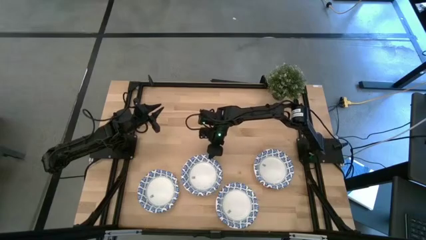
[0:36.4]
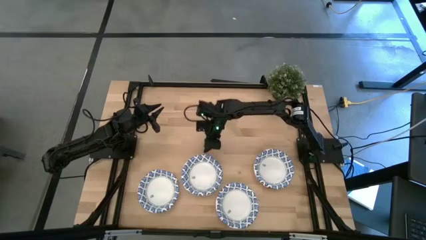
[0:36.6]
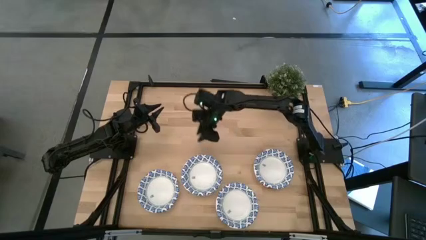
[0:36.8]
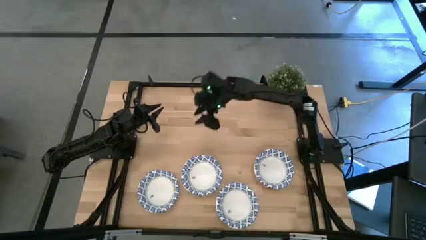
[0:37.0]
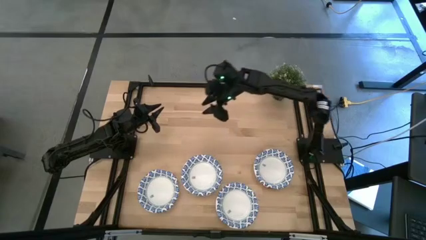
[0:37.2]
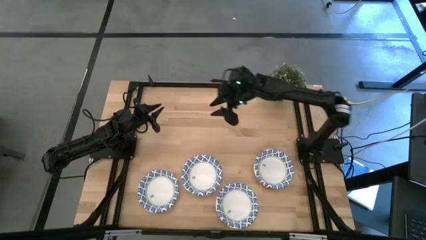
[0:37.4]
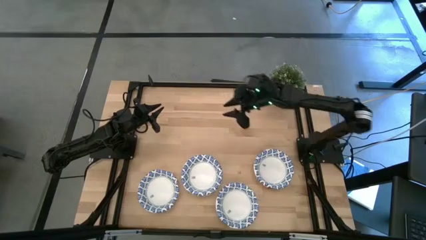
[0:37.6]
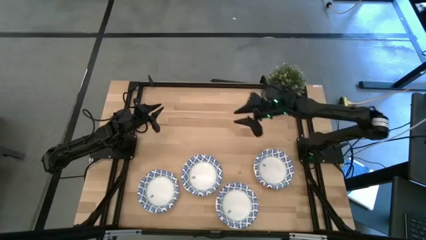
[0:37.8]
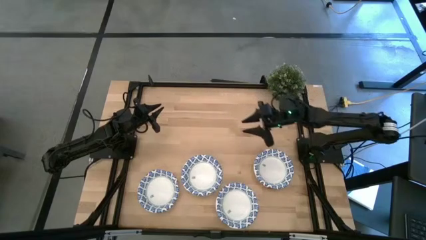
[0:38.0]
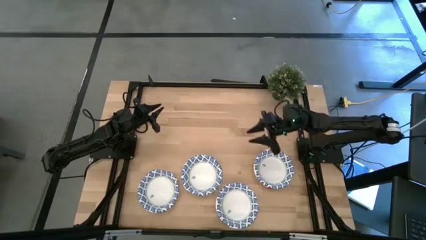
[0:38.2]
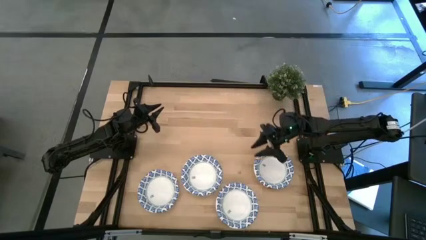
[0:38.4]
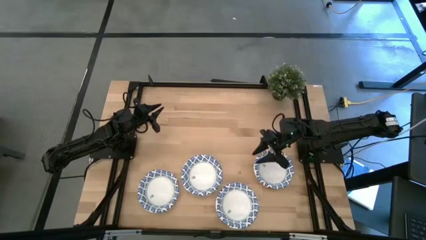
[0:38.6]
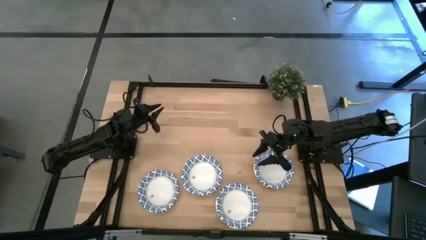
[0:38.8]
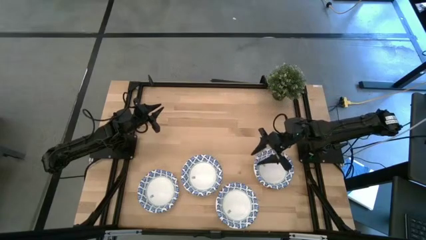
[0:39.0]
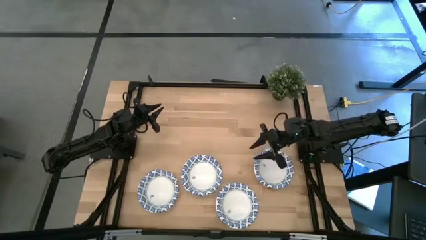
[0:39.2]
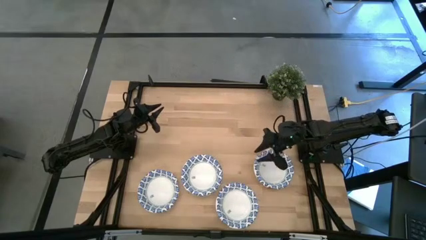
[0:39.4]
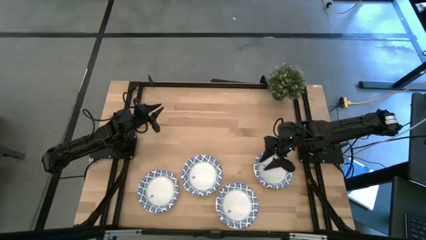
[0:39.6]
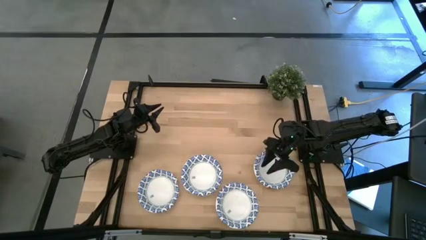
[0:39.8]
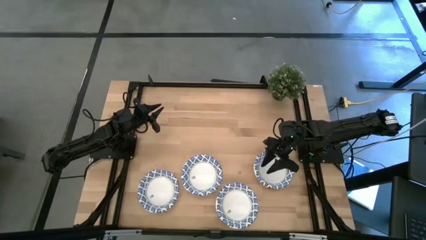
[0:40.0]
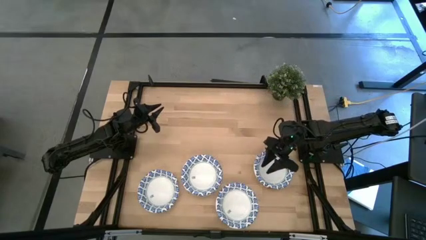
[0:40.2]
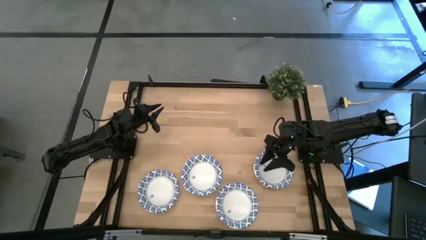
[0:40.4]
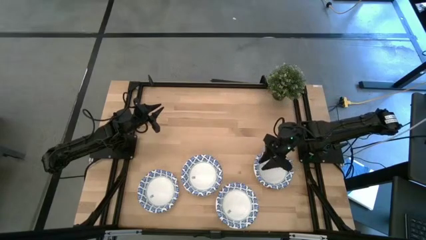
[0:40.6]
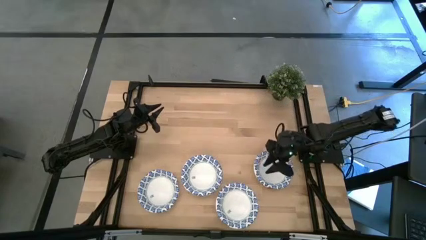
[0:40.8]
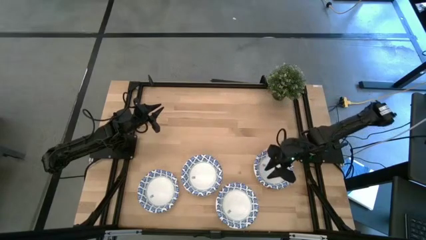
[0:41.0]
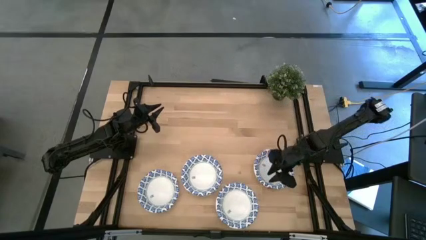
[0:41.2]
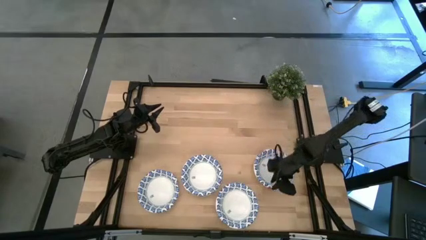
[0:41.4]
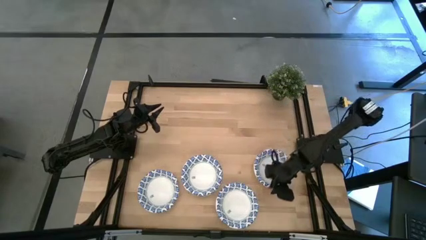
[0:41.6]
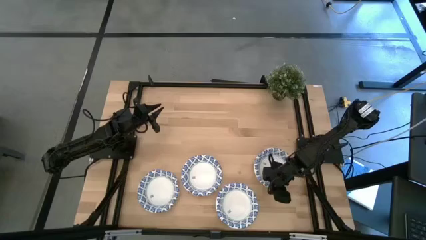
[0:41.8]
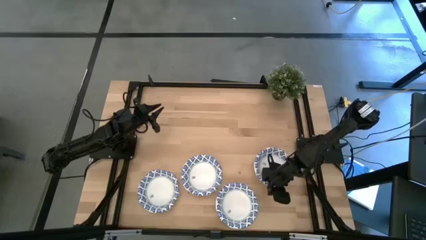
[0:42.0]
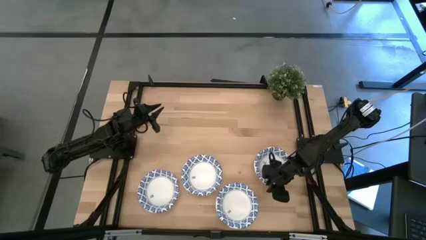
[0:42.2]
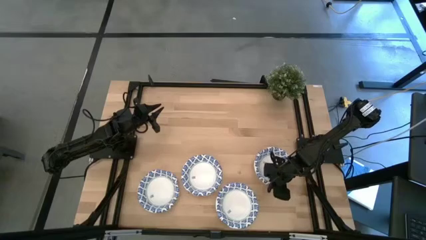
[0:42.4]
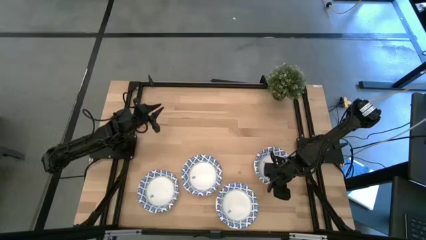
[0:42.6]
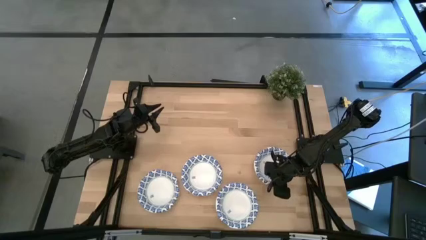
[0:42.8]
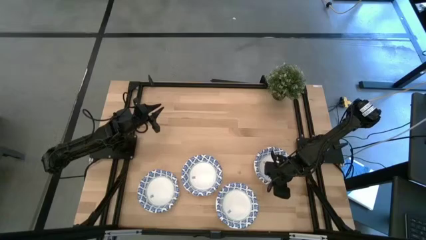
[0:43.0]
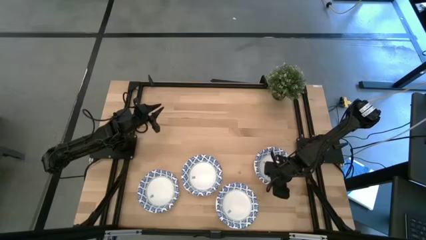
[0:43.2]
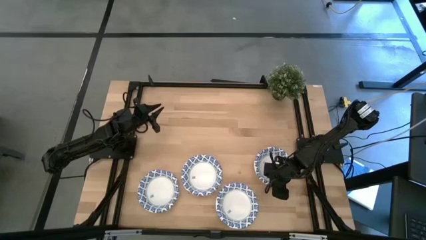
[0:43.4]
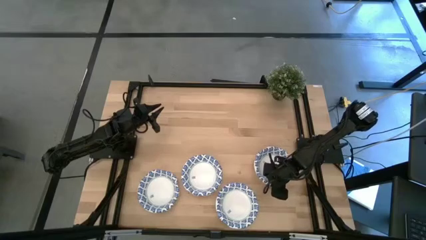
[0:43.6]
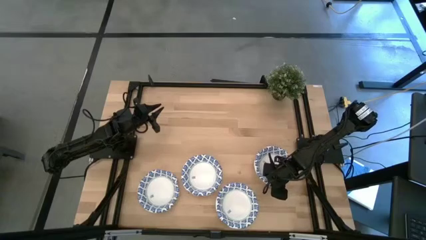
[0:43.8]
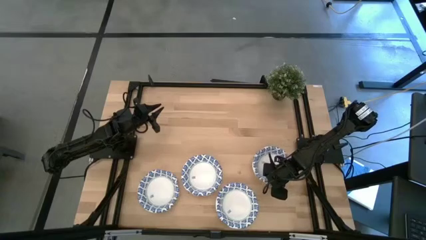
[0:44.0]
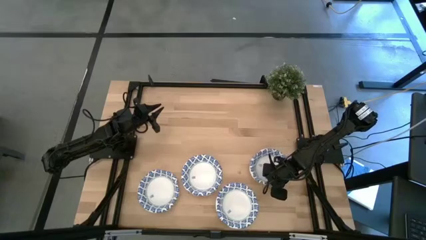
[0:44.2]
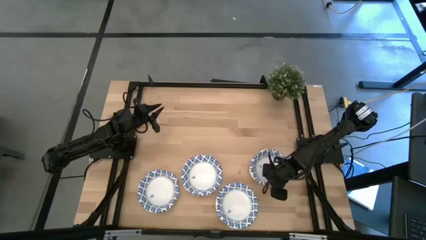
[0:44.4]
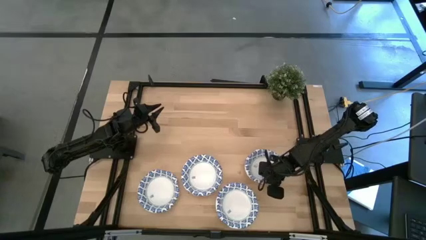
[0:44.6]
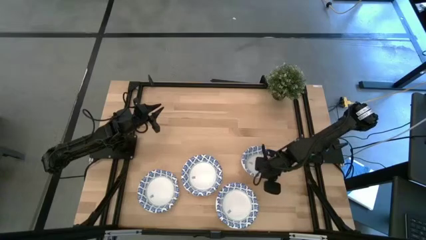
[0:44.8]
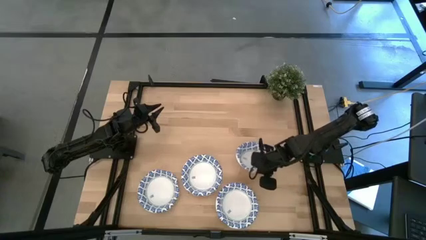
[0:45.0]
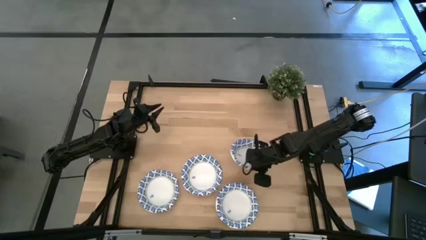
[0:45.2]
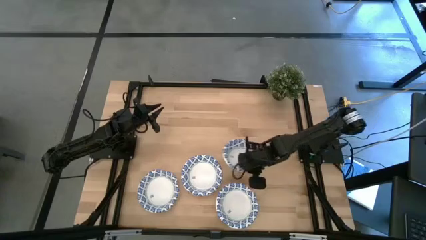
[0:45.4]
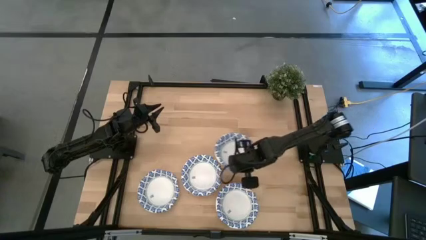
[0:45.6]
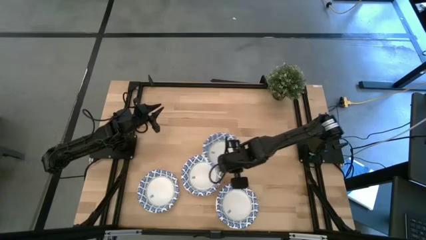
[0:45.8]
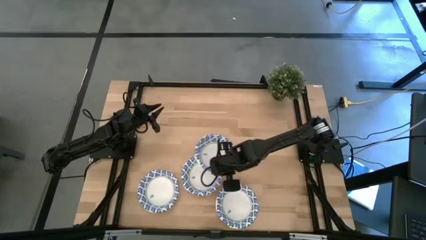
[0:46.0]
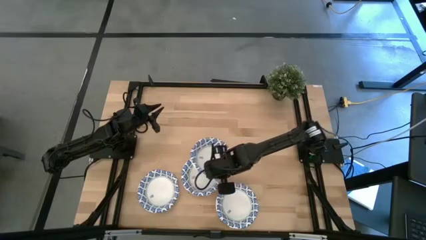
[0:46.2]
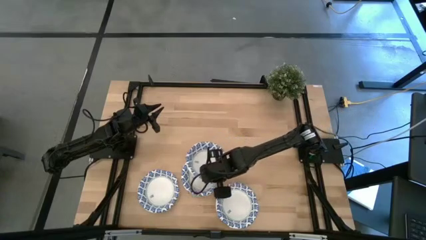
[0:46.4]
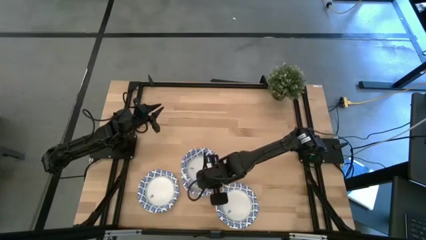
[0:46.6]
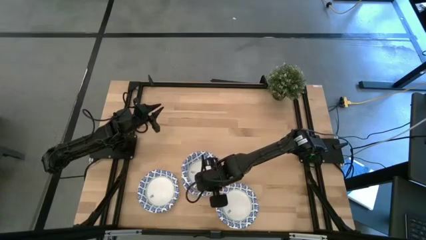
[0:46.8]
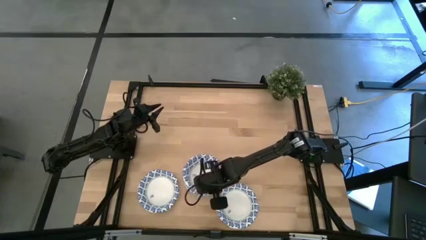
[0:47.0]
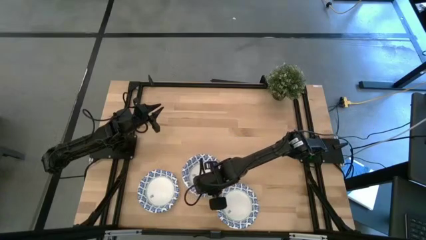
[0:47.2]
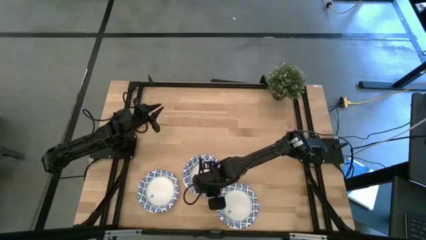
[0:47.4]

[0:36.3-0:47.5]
Task: Nest bowls inside each other
Stack the bowl on top of the other blue bowls

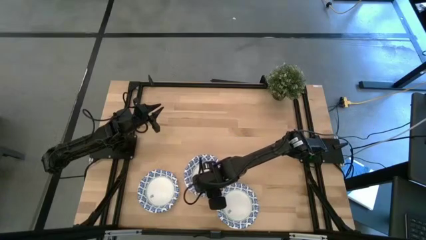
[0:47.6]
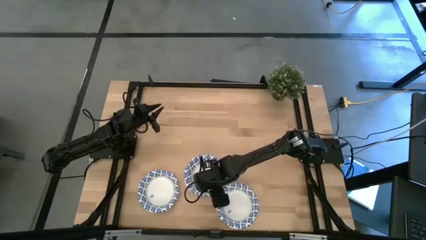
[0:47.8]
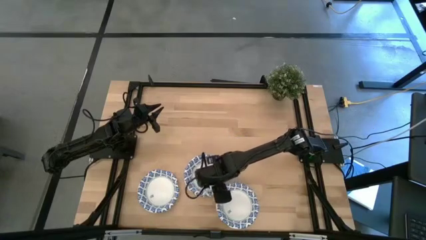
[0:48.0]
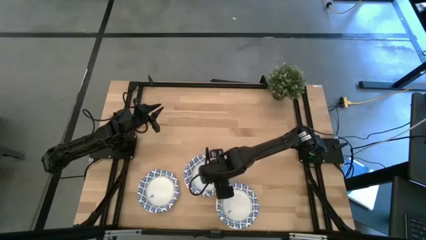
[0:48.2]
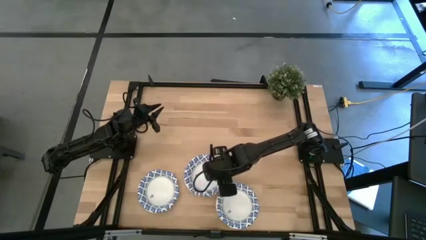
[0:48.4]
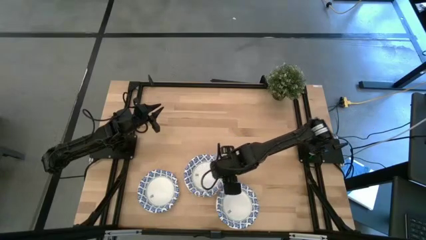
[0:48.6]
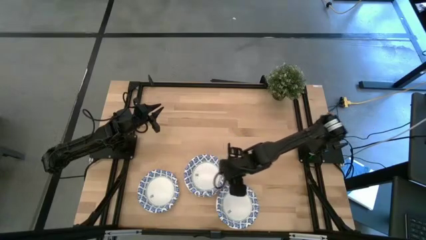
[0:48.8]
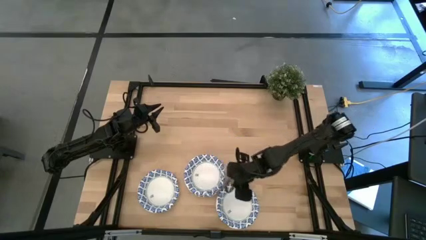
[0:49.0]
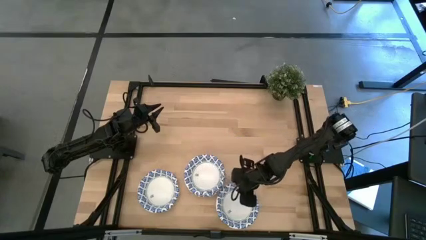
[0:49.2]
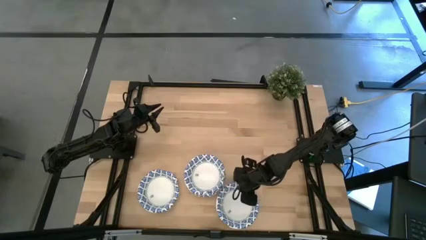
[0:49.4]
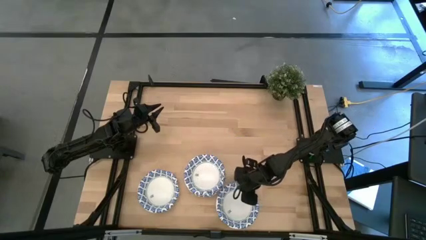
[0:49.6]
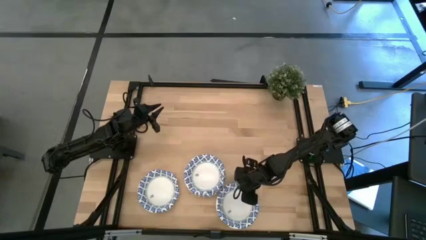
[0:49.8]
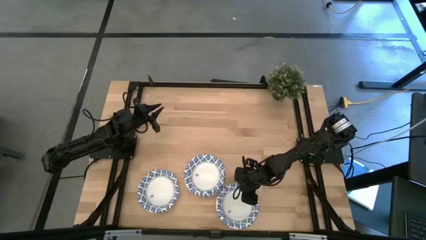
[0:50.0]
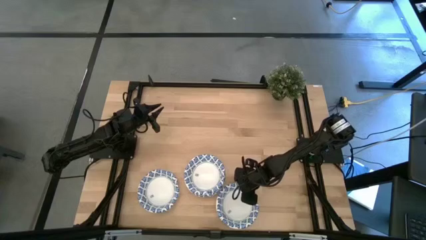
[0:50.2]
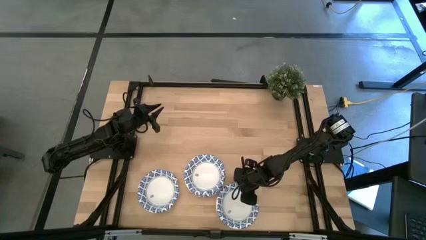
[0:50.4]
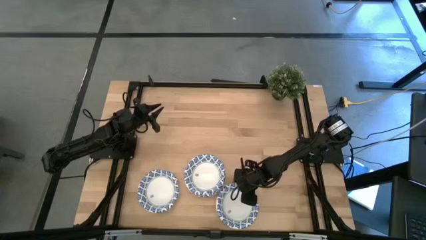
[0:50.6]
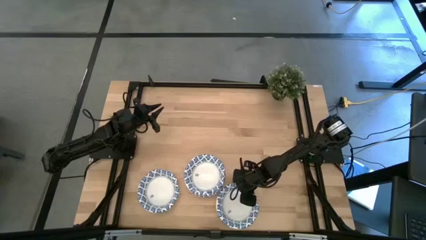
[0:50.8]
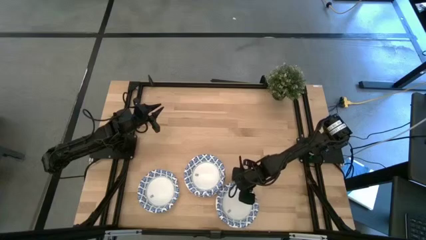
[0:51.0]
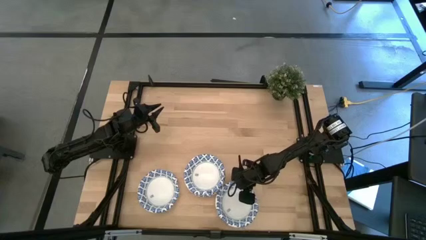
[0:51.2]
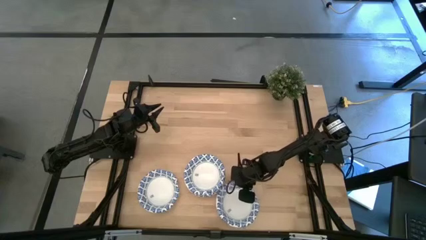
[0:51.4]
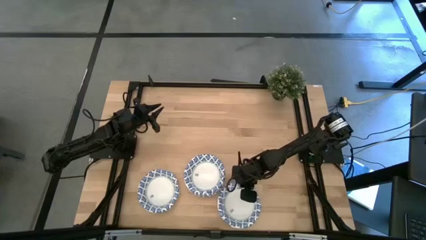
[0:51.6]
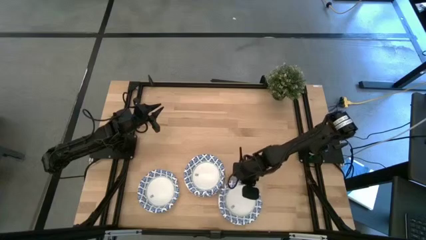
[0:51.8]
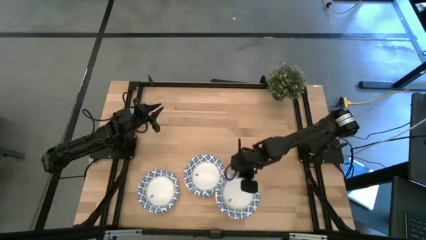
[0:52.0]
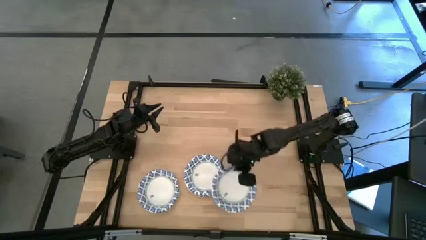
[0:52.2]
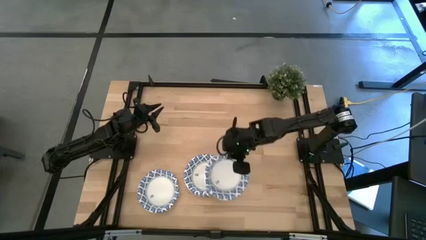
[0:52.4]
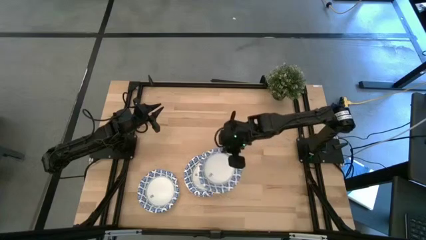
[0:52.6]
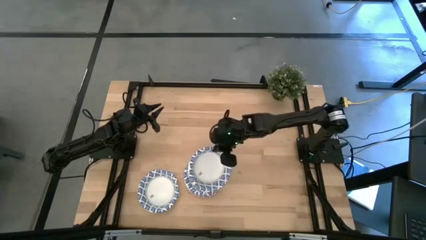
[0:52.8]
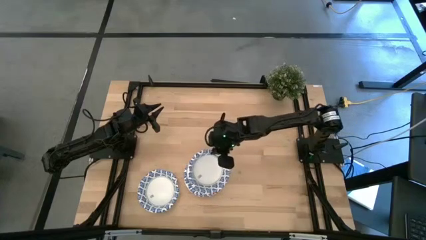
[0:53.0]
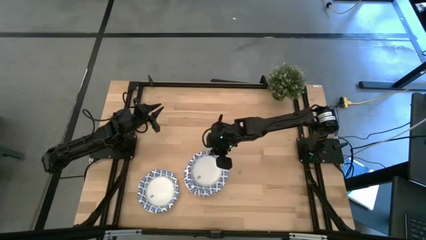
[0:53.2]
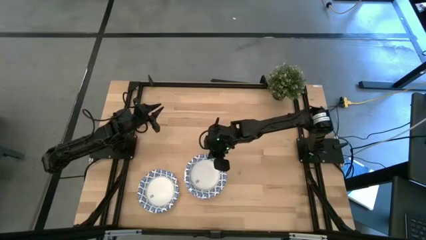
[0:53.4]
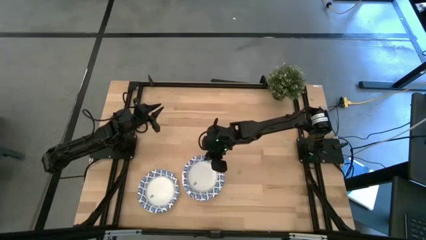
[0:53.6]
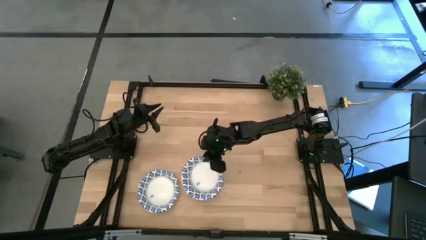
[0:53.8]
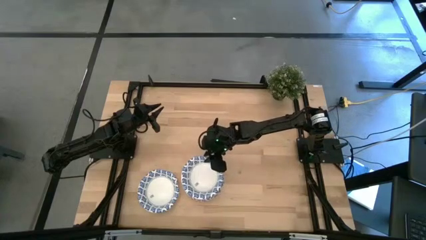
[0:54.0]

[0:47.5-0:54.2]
Stack the bowl on top of the other blue bowls
